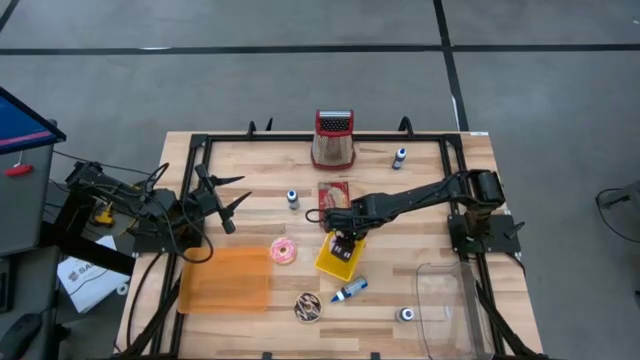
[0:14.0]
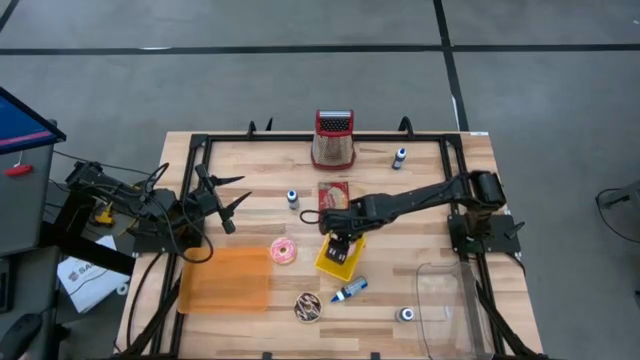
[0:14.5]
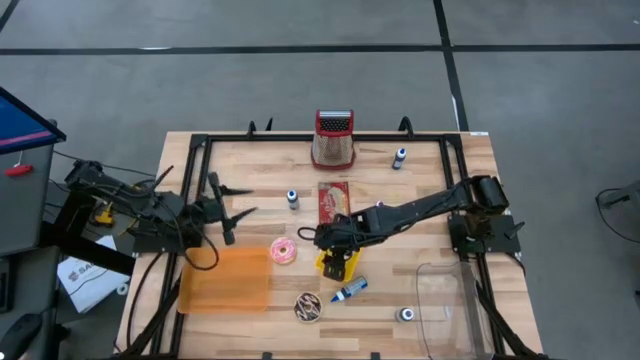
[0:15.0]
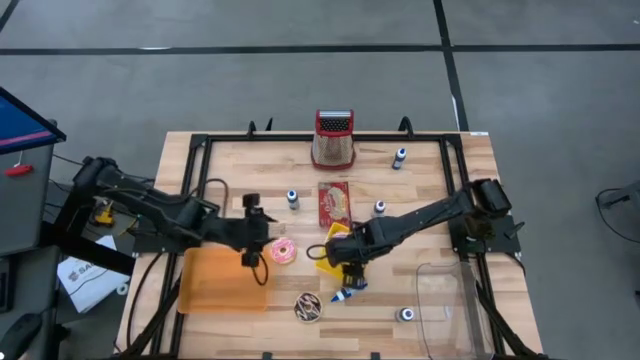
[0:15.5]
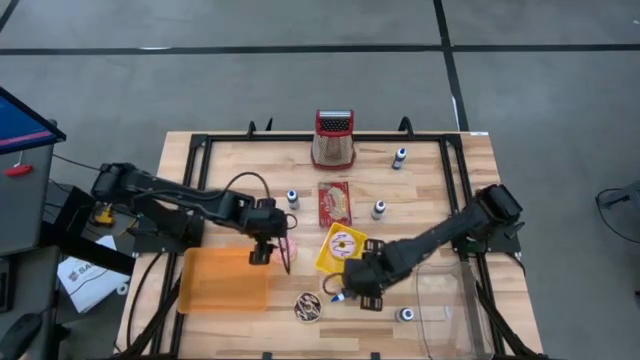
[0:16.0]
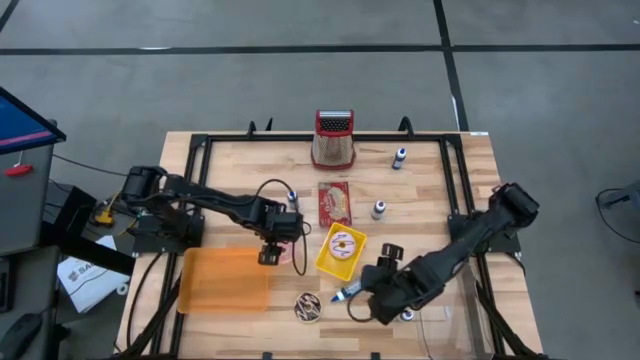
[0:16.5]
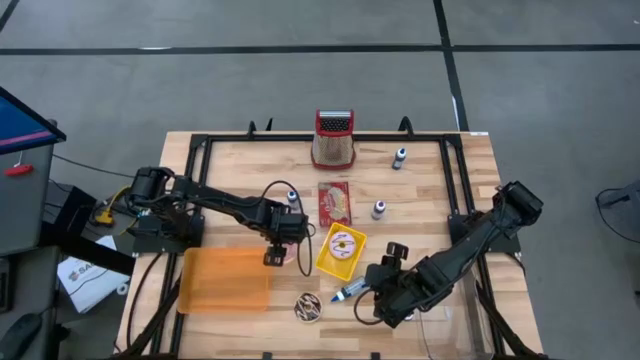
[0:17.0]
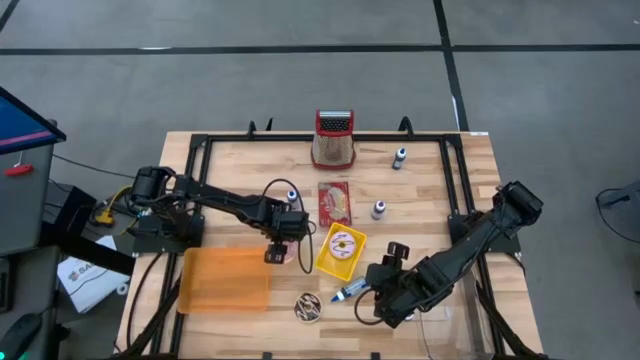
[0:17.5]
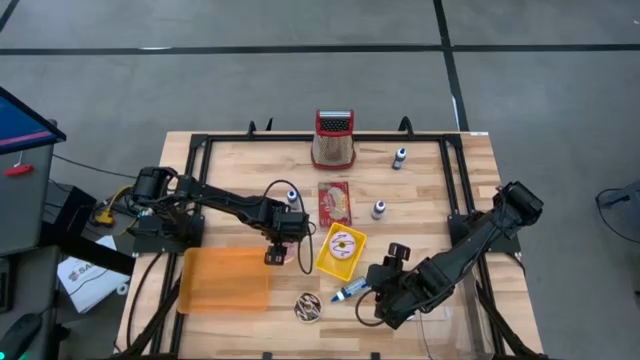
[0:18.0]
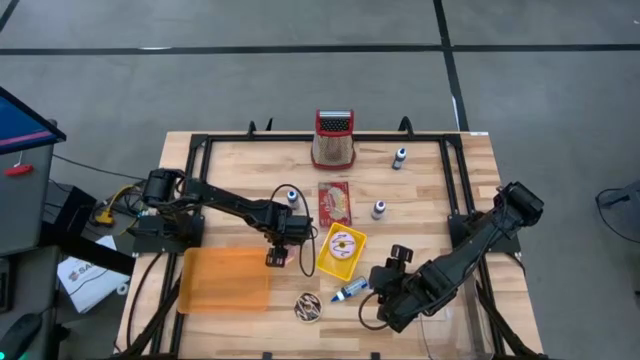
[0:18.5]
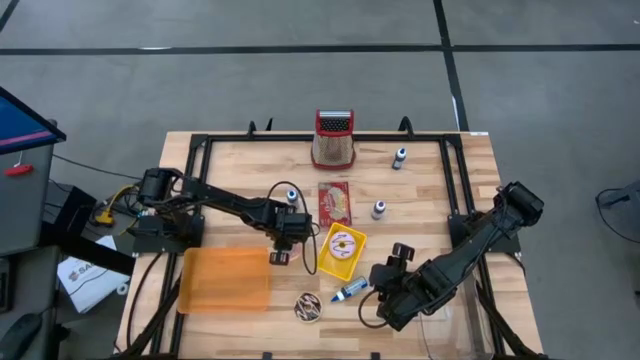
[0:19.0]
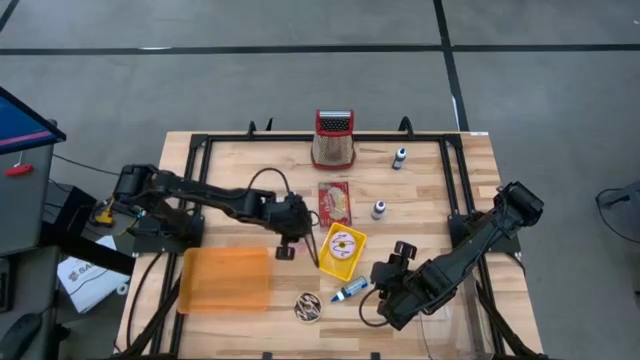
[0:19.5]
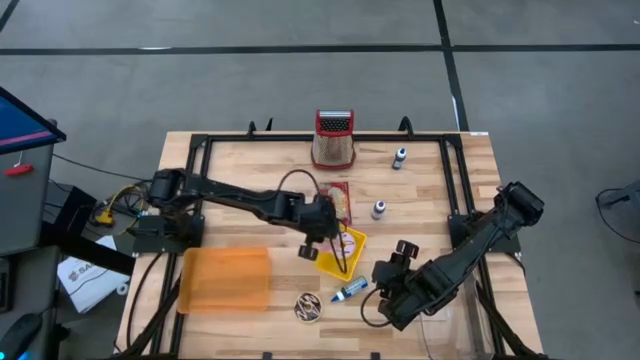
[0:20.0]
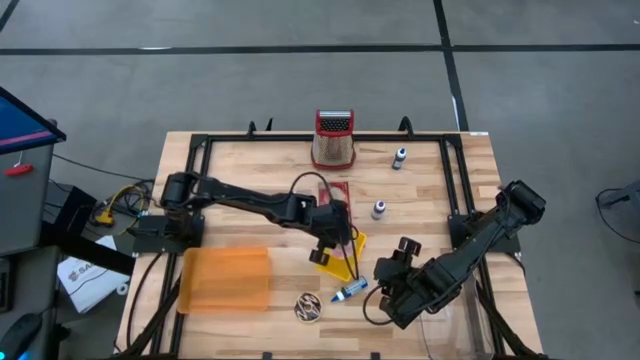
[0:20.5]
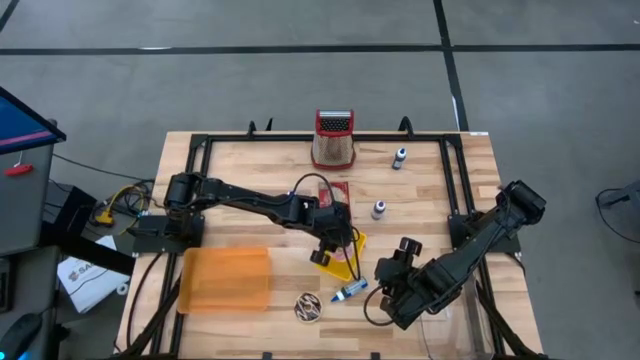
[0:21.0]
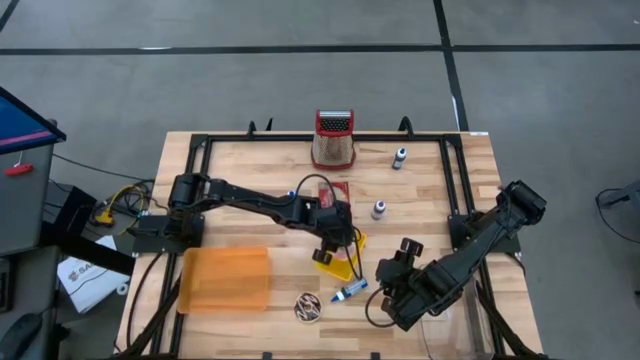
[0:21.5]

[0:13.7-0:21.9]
Put the pink donut into the yellow basket

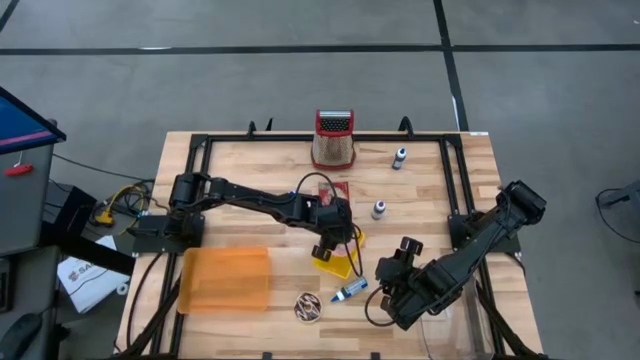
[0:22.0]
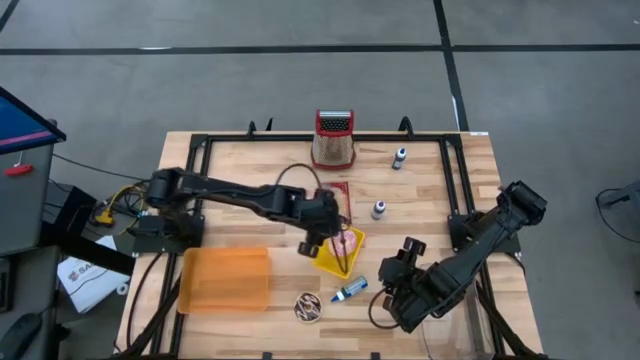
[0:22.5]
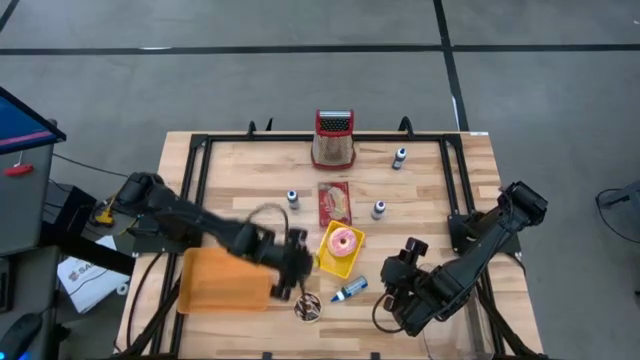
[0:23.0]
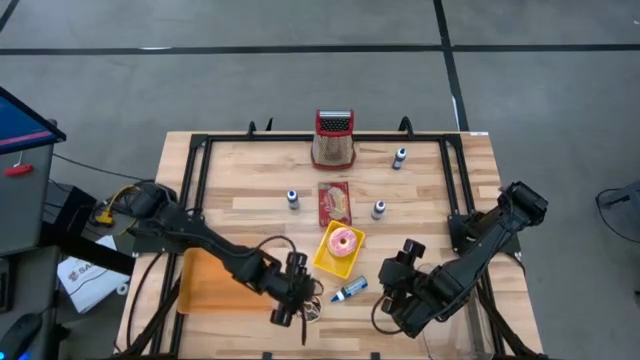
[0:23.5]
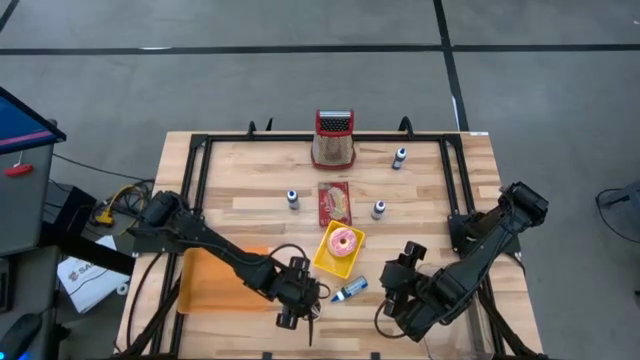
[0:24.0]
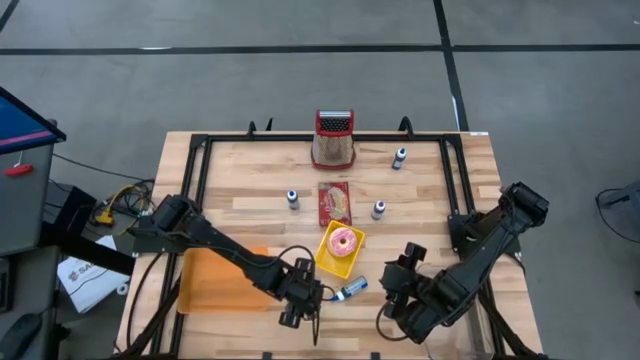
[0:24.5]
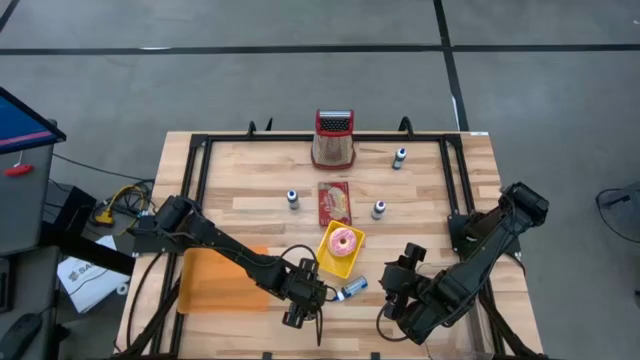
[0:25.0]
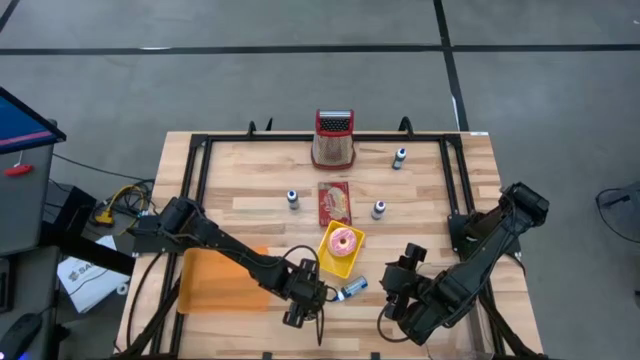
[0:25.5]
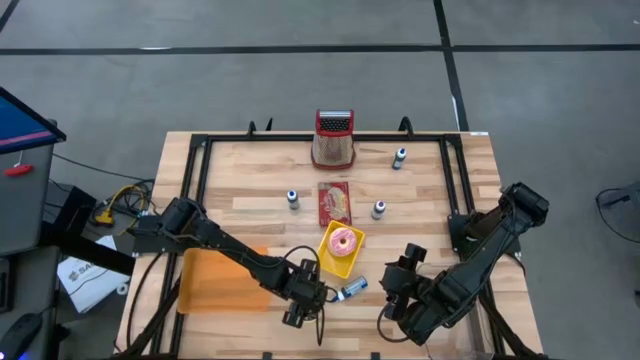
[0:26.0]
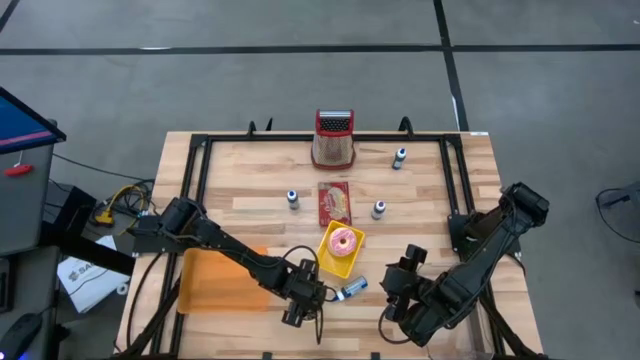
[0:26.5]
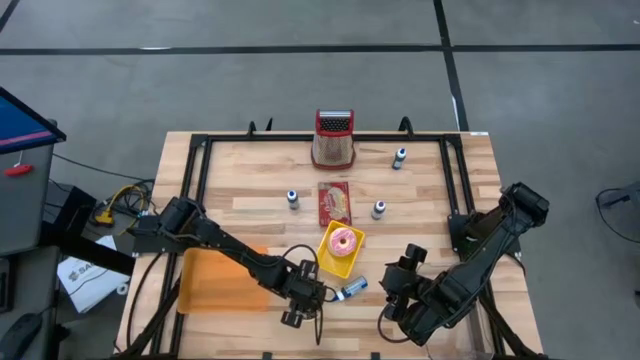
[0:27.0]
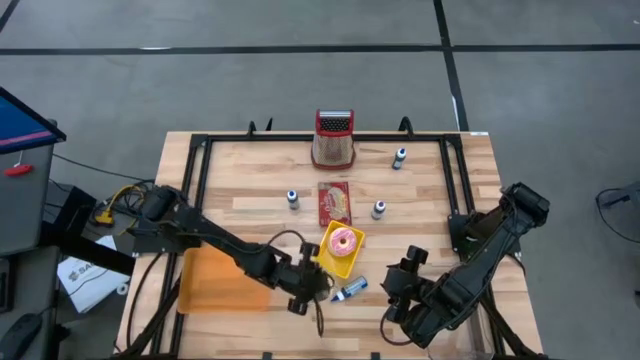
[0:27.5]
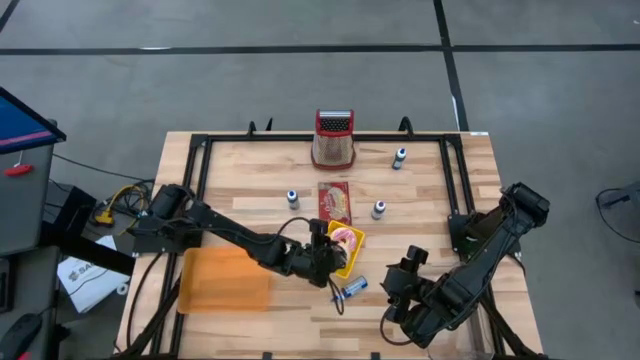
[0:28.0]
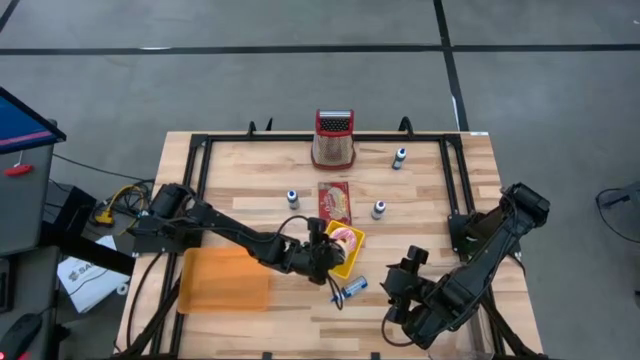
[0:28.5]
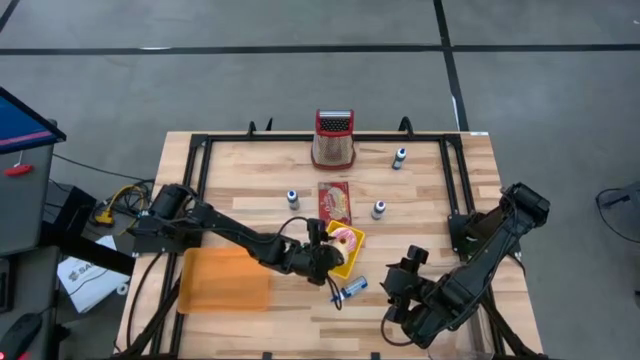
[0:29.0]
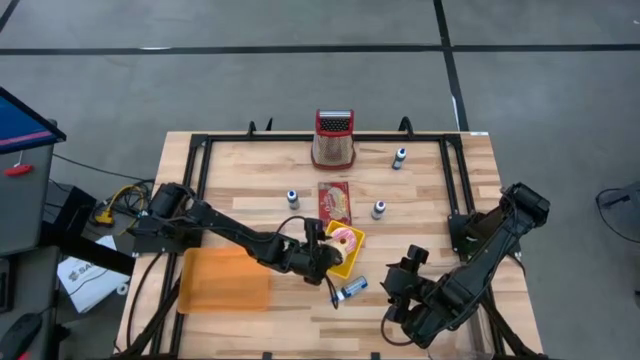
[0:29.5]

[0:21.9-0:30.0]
Put the brown donut into the yellow basket

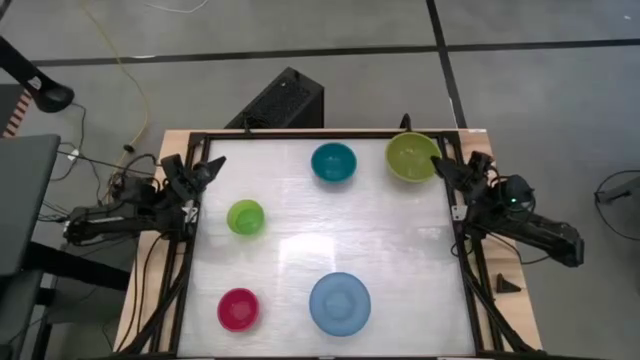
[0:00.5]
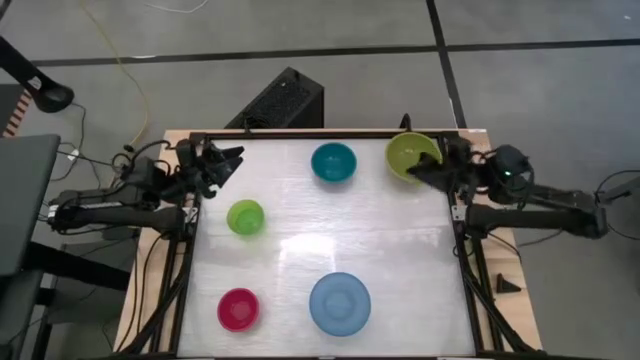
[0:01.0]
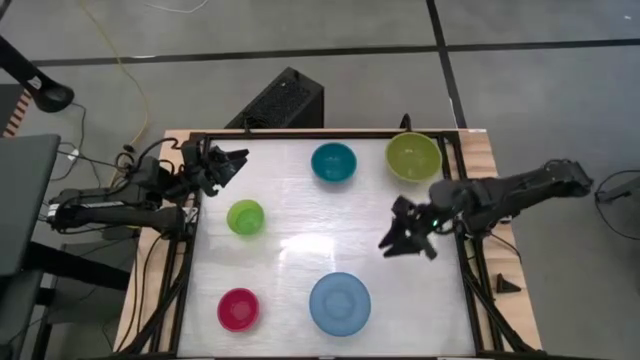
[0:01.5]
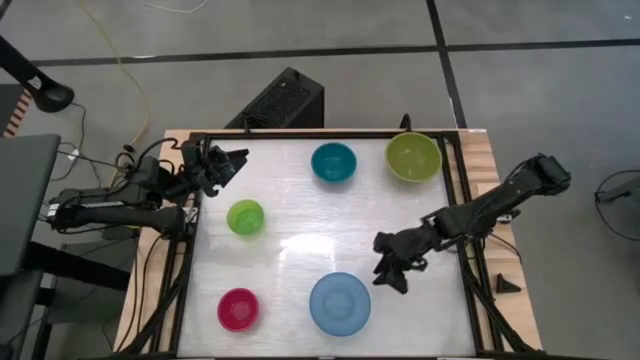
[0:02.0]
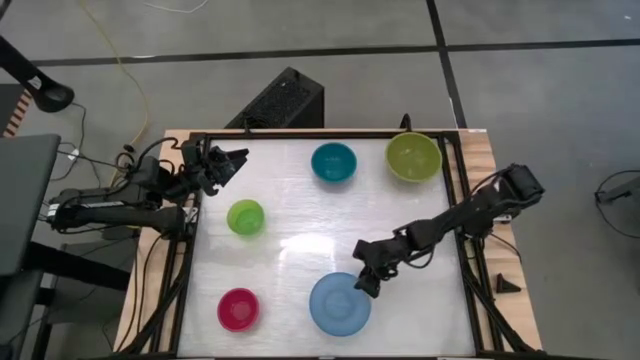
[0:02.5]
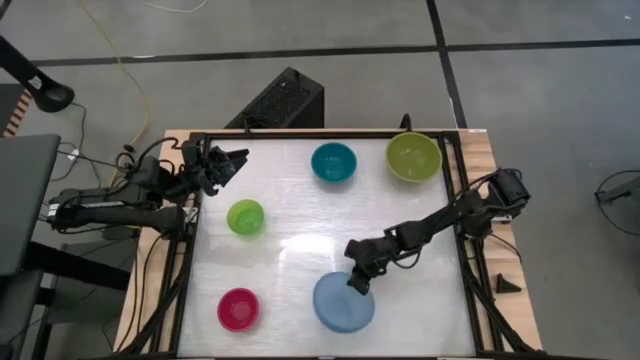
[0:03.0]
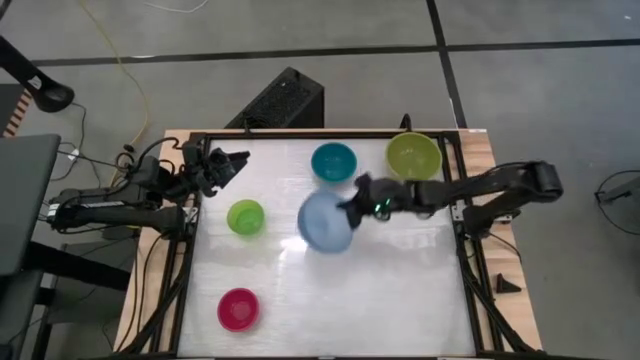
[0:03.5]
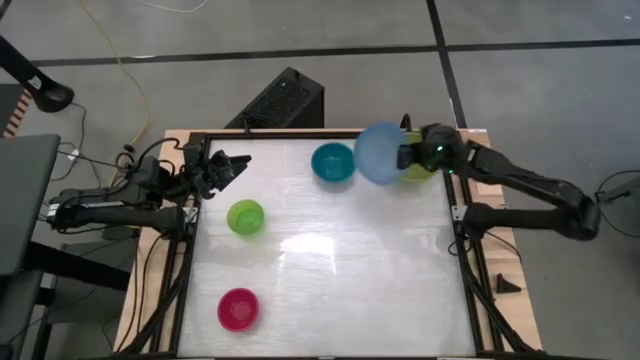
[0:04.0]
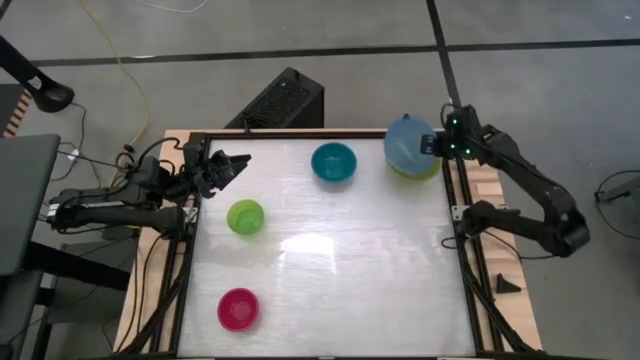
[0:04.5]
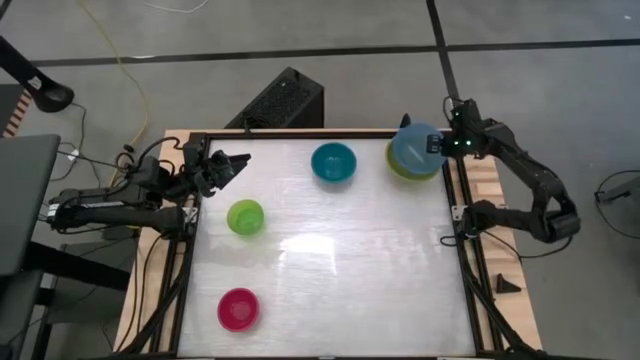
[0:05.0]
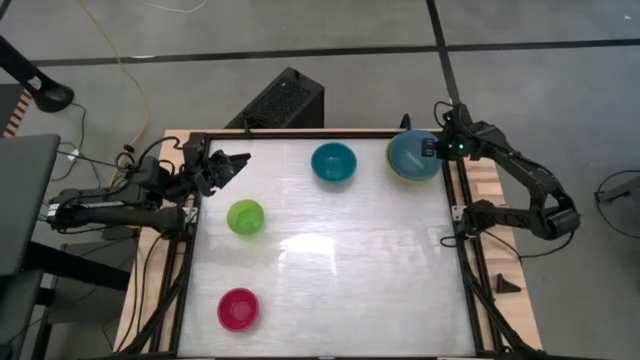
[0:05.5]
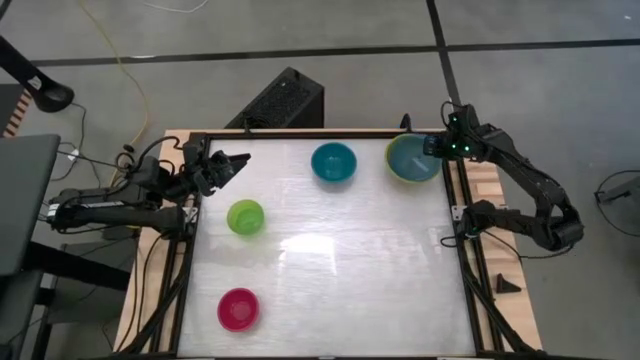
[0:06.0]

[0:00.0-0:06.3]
Stack the light blue bowl on the green bowl
